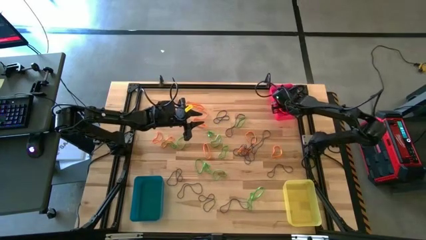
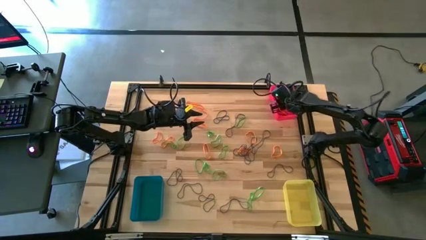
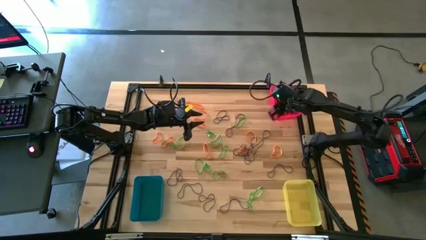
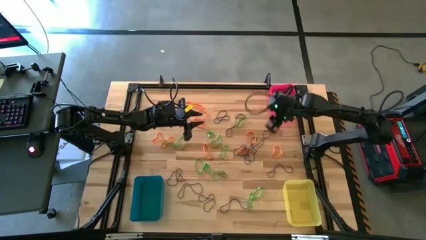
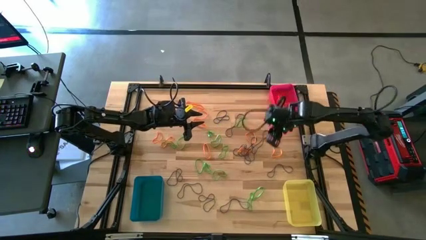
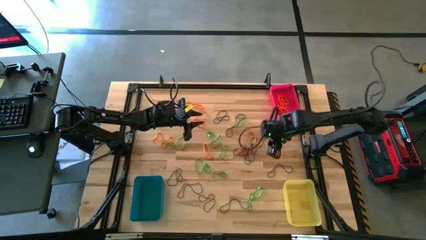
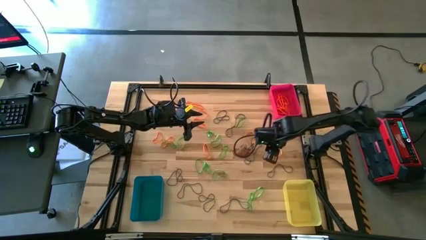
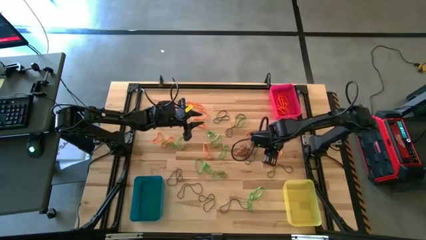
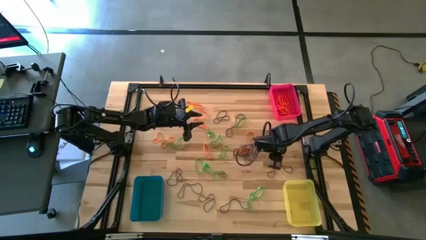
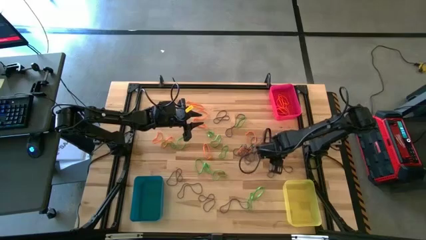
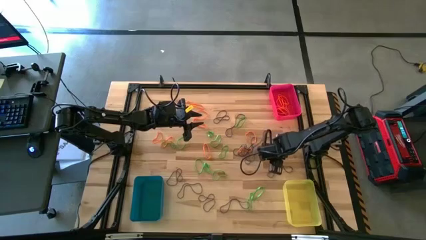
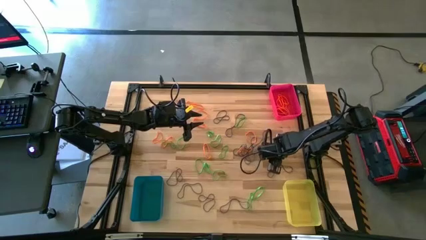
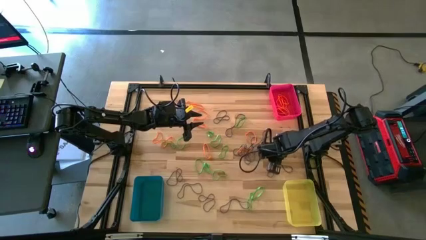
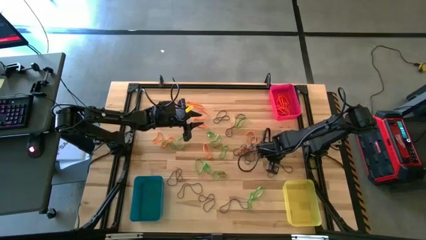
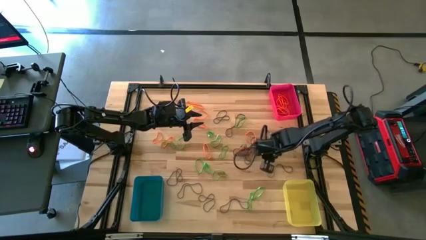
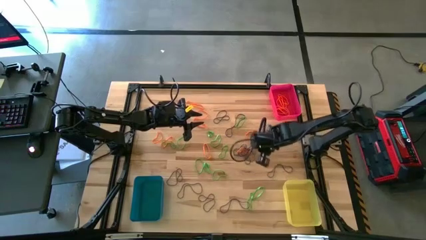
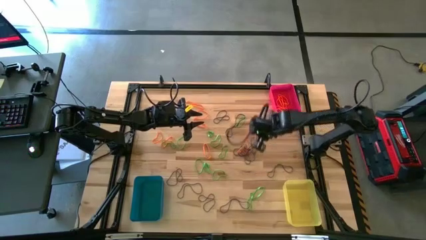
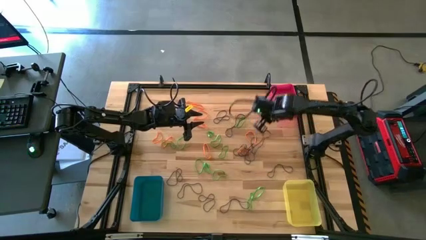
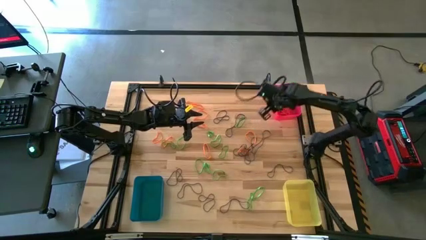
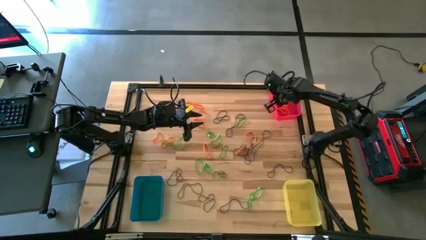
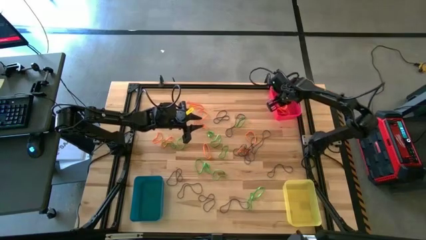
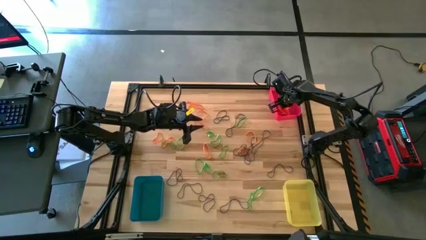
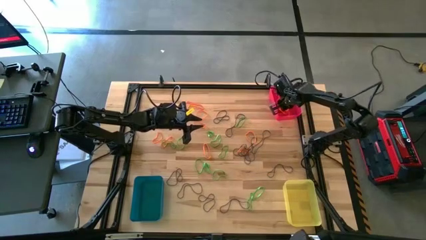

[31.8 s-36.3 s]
Task: Sort rubber bands into baskets
Put the orange rubber band into the red bin

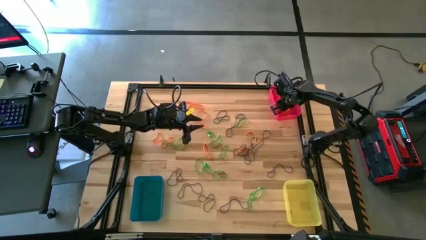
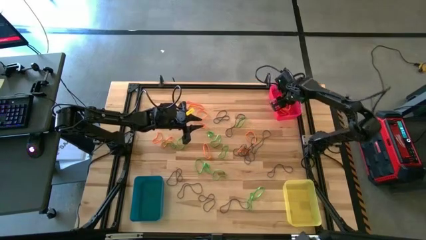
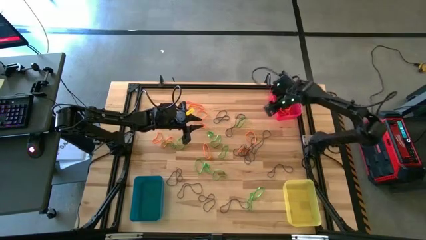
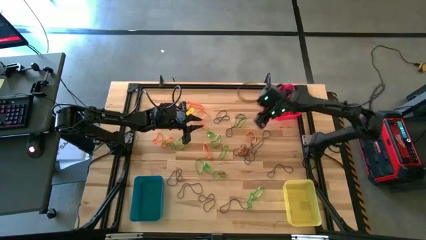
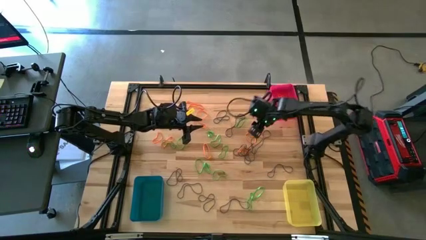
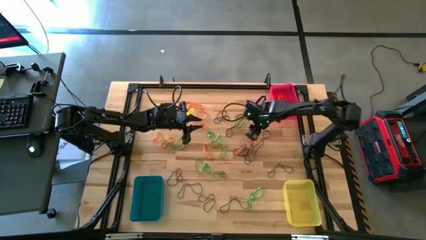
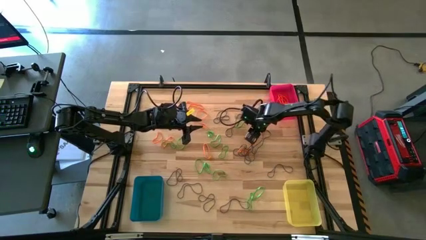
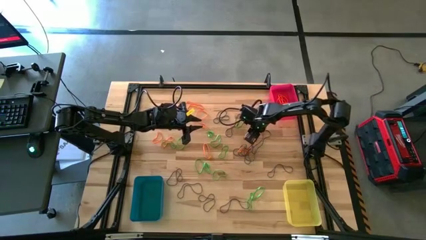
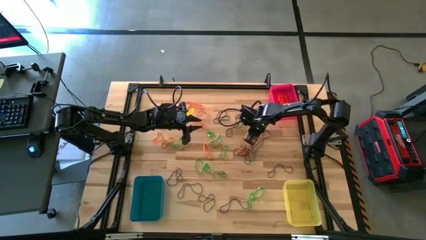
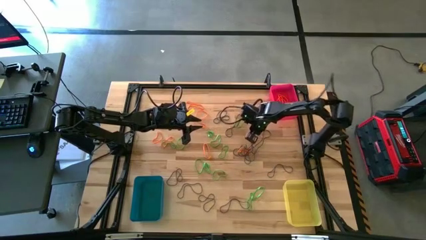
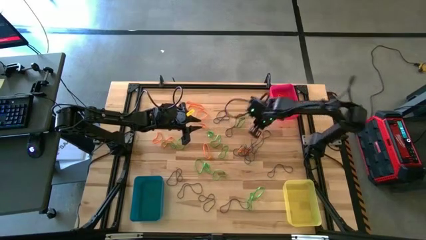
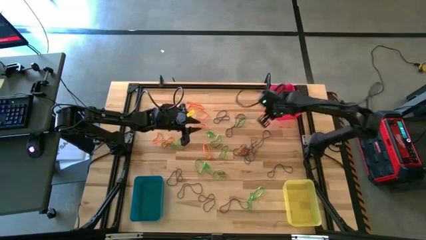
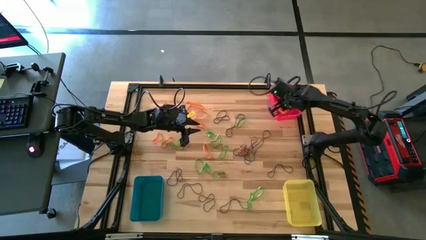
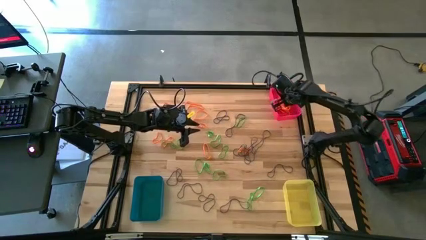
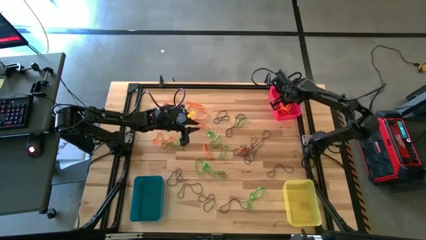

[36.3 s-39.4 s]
Put the orange rubber band into the red bin

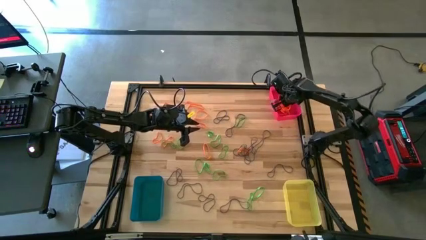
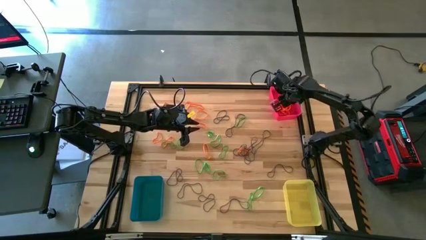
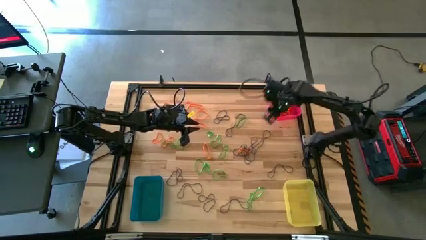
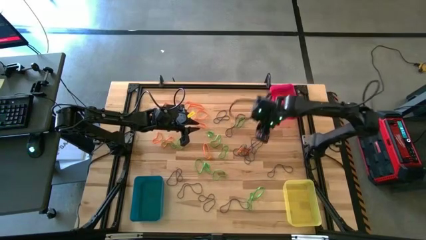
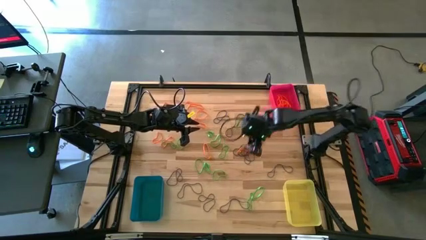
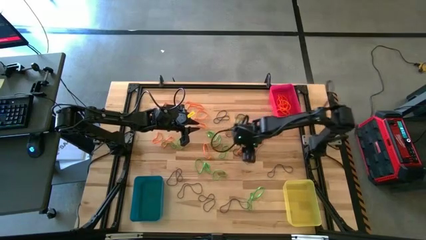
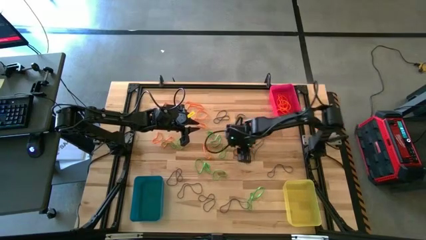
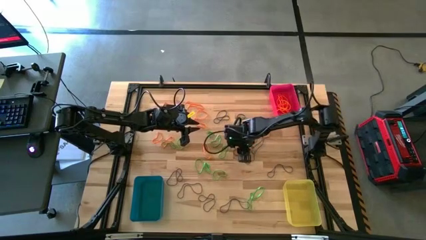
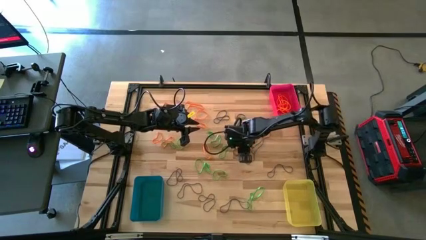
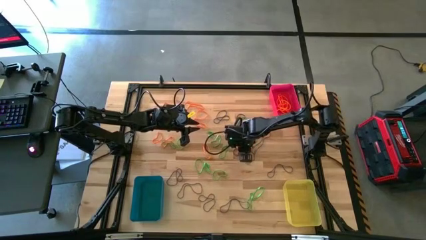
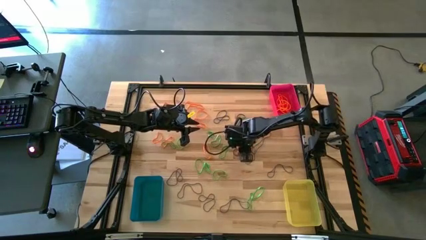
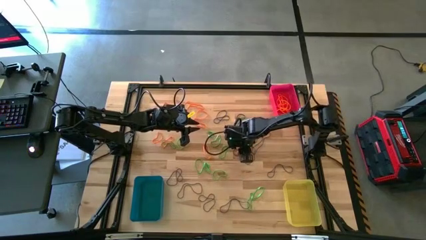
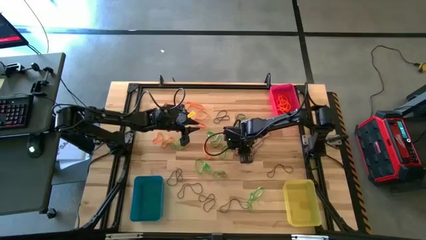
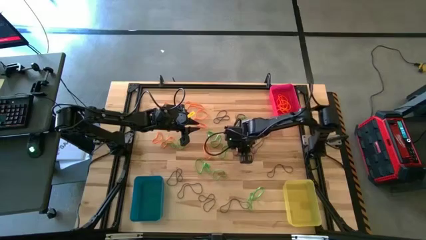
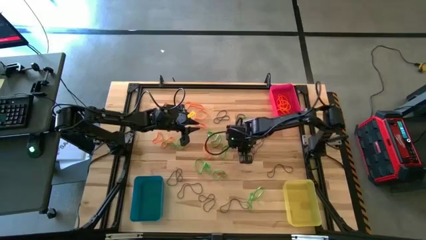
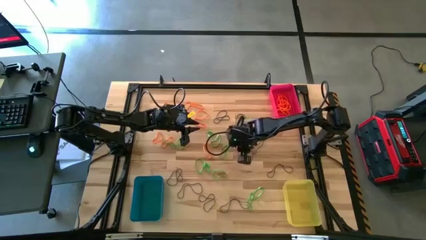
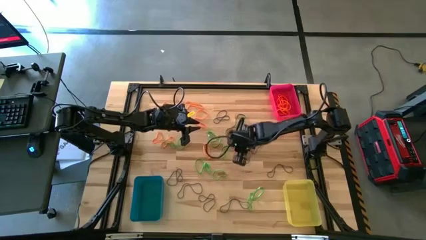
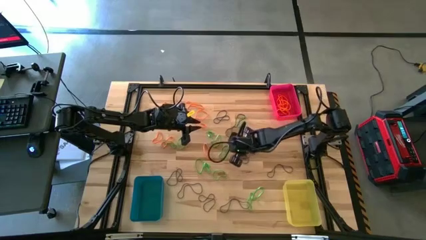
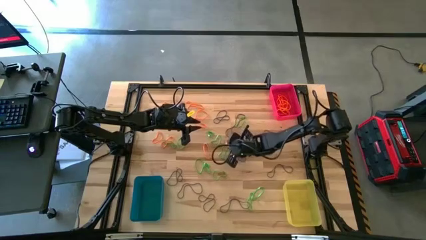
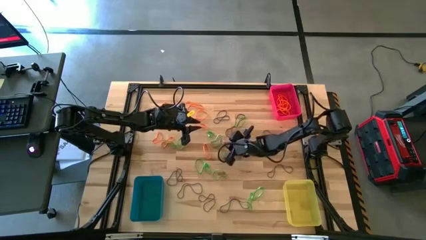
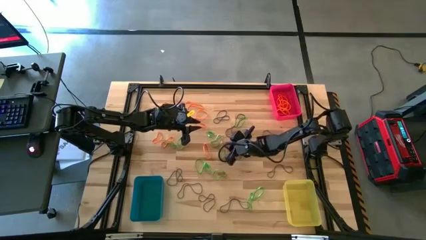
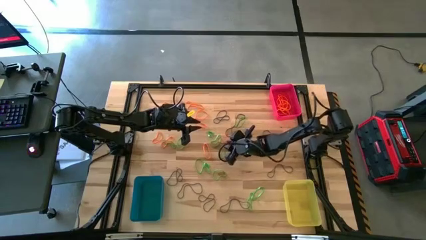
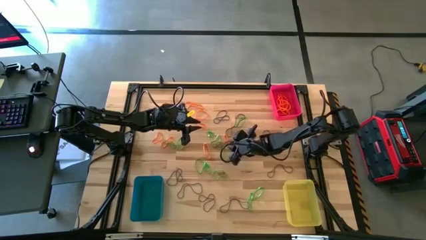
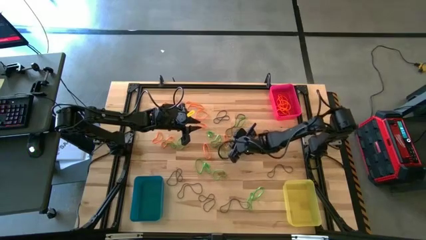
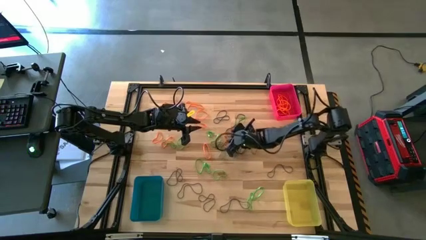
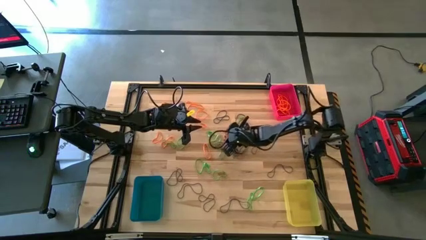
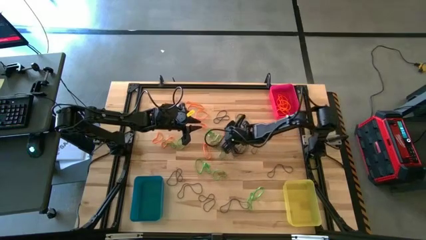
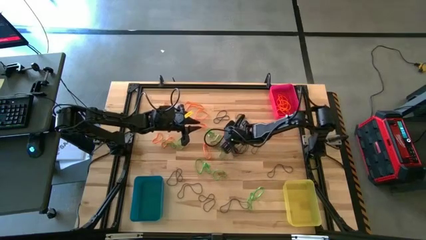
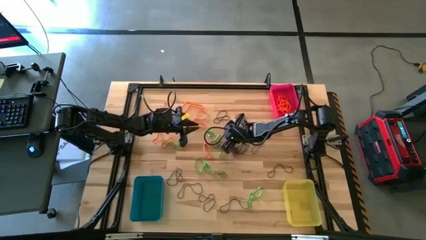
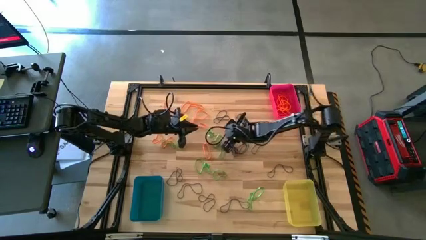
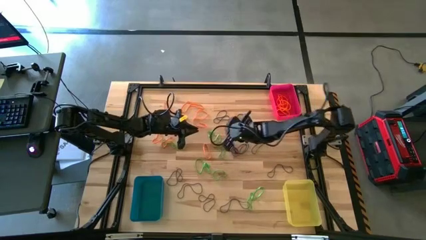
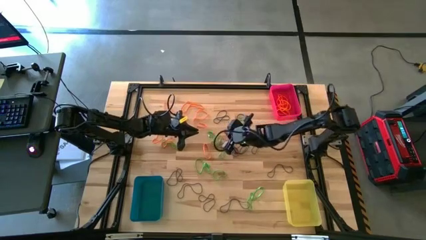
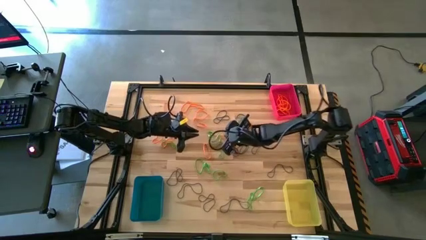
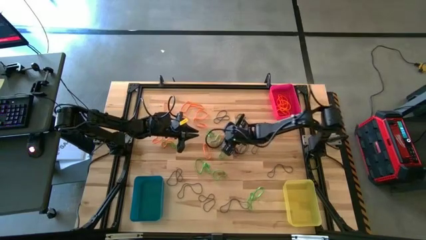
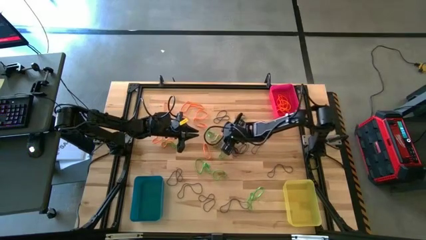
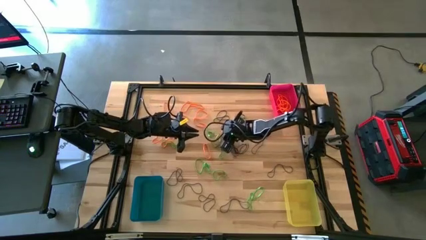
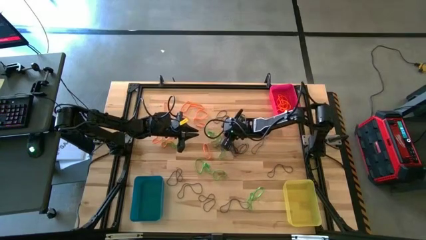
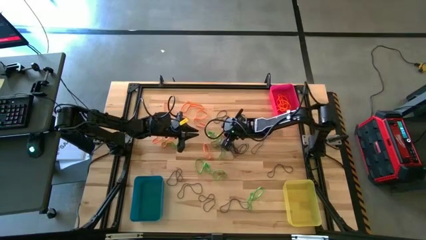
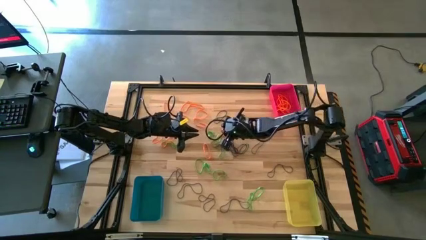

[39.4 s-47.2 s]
Put the orange rubber band into the red bin

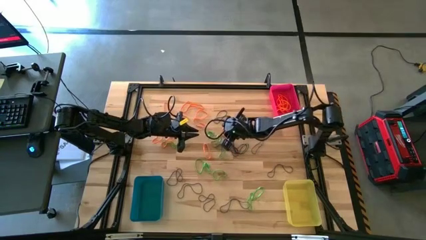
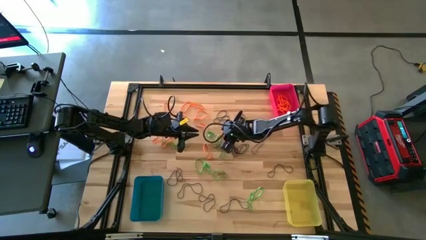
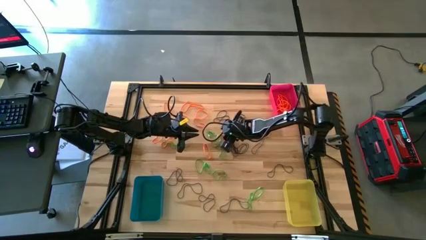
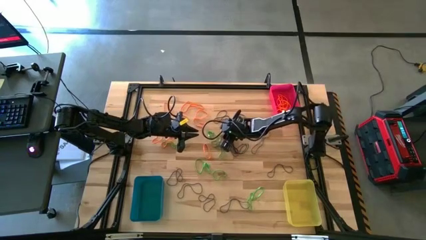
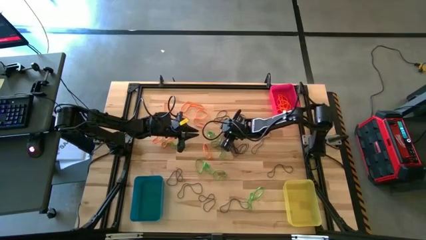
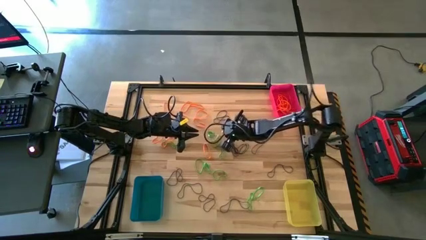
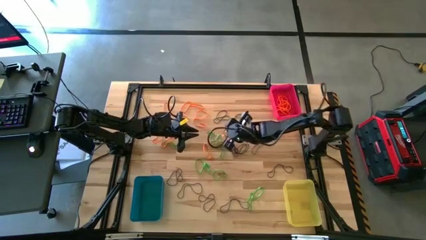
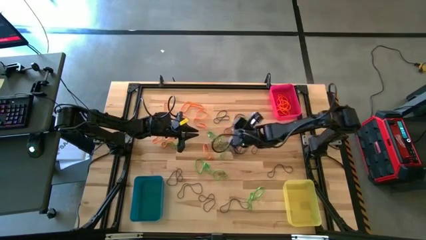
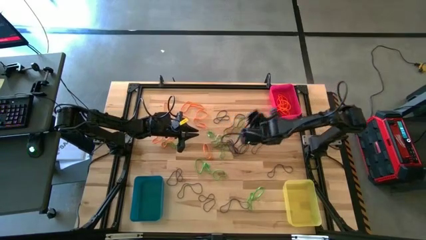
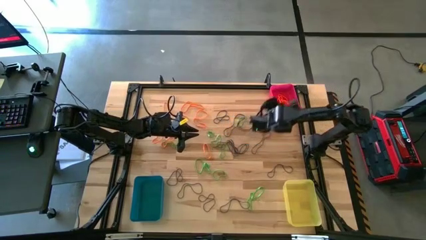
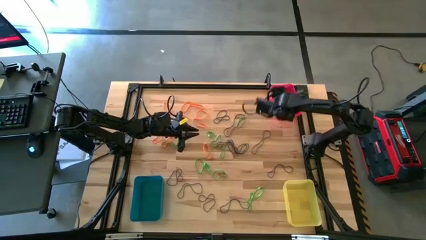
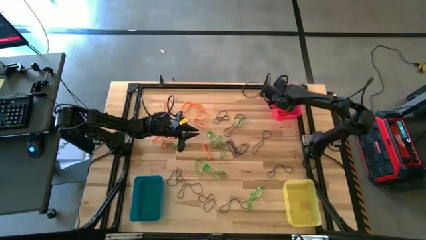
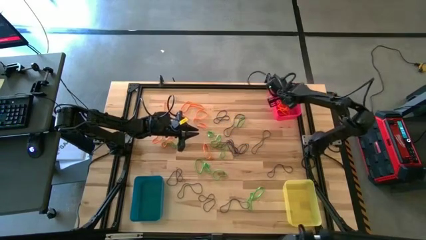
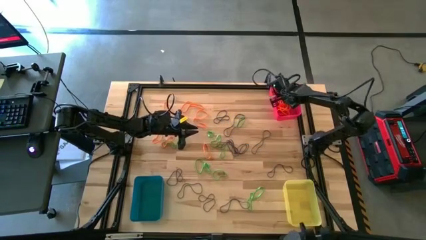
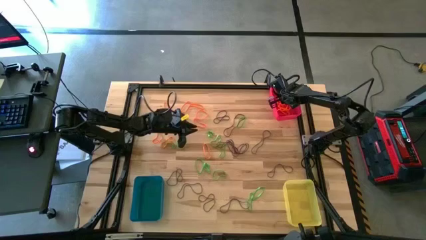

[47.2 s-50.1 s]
Put the orange rubber band into the red bin
